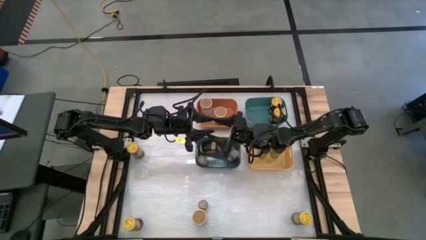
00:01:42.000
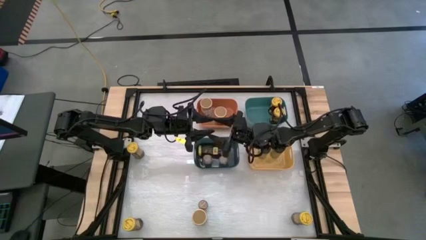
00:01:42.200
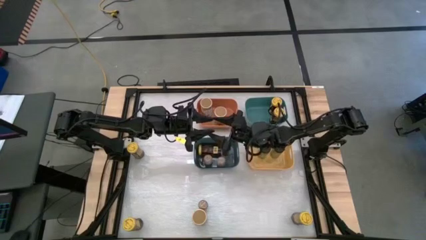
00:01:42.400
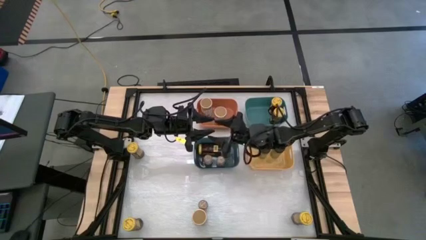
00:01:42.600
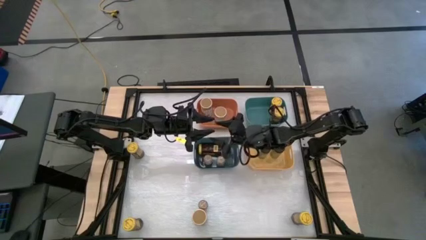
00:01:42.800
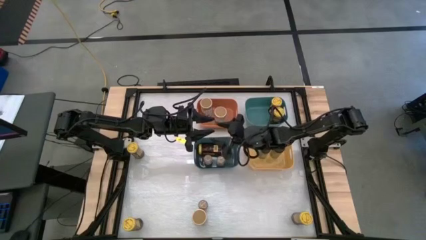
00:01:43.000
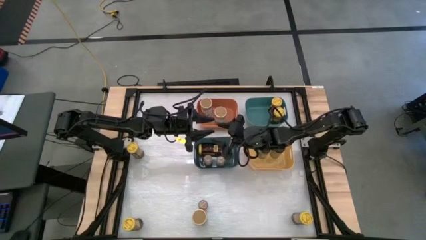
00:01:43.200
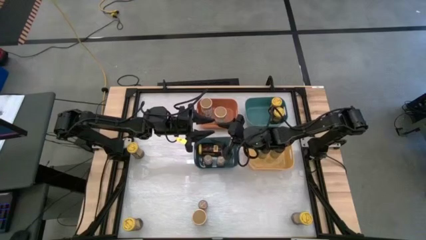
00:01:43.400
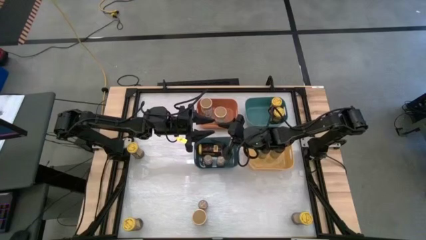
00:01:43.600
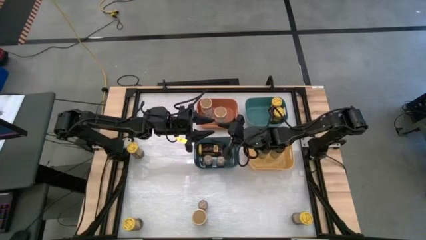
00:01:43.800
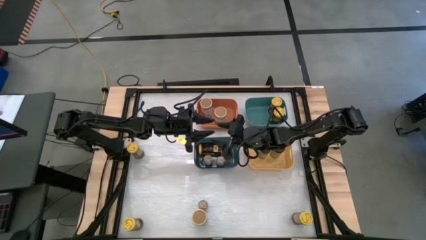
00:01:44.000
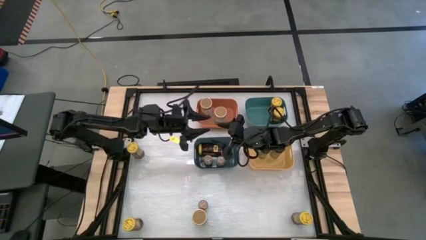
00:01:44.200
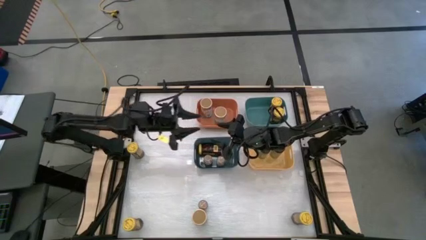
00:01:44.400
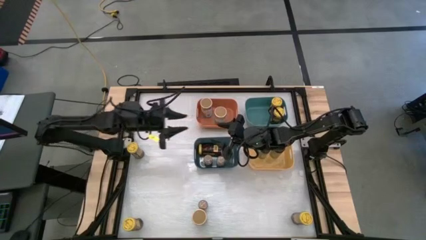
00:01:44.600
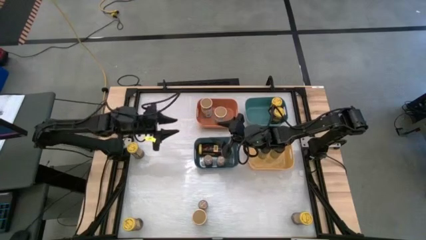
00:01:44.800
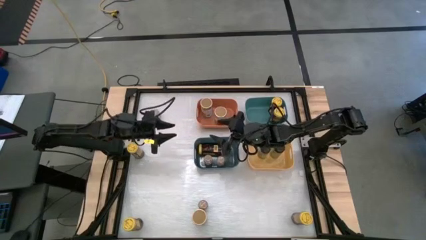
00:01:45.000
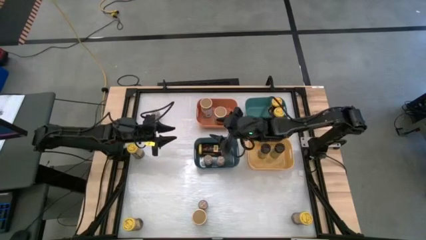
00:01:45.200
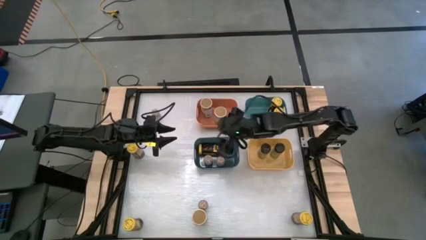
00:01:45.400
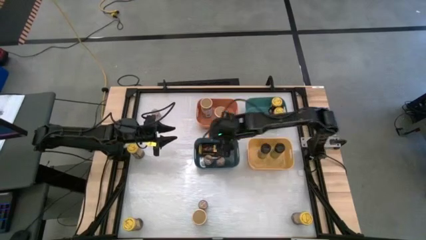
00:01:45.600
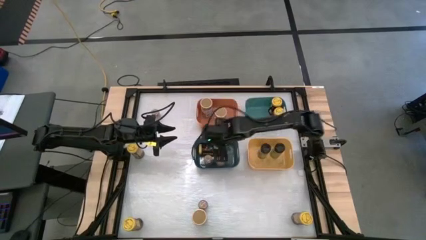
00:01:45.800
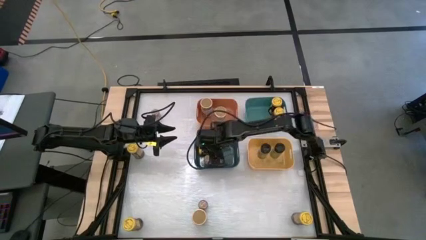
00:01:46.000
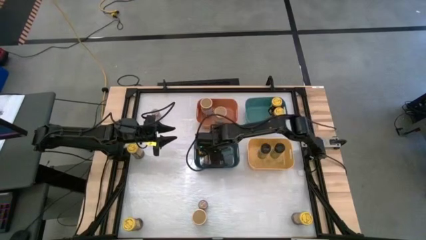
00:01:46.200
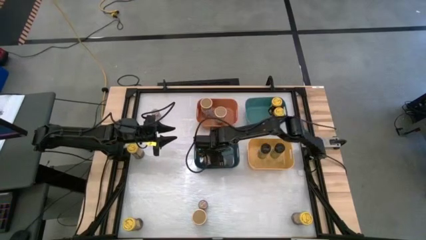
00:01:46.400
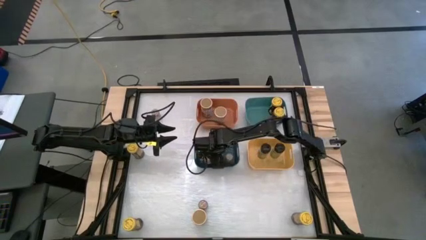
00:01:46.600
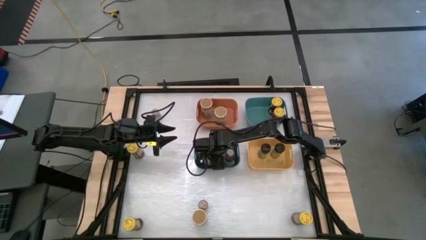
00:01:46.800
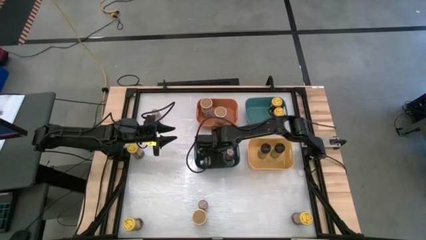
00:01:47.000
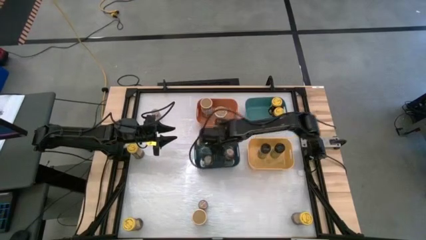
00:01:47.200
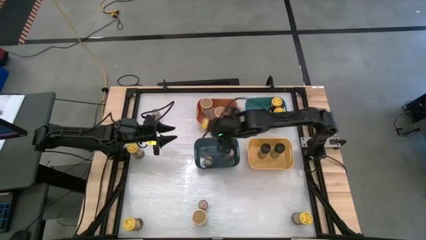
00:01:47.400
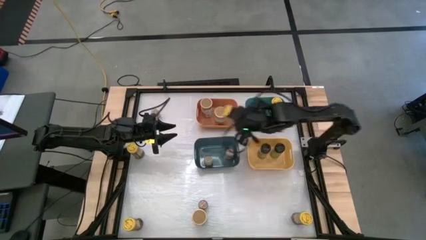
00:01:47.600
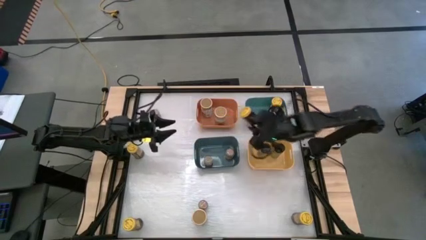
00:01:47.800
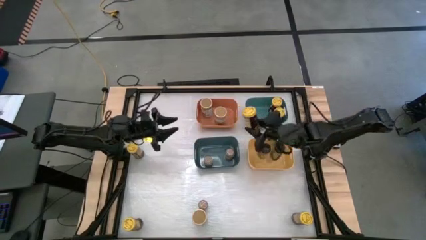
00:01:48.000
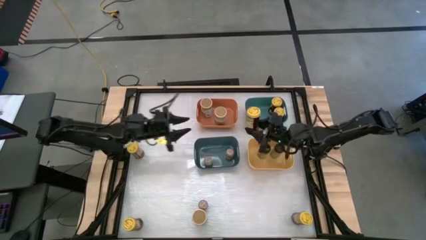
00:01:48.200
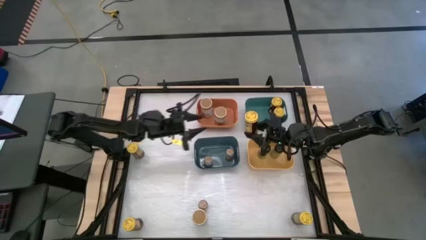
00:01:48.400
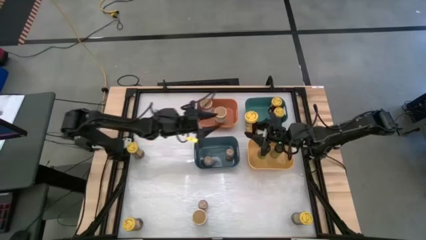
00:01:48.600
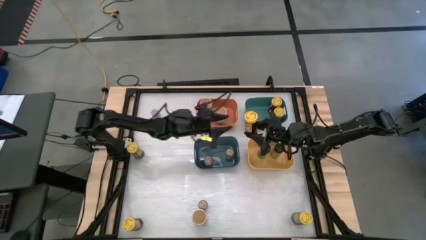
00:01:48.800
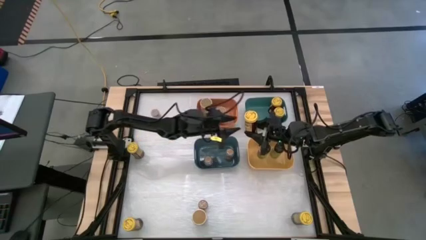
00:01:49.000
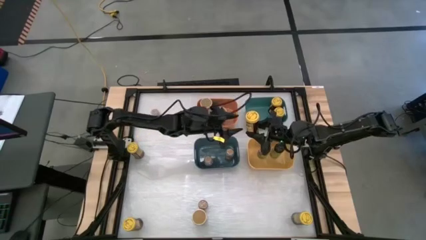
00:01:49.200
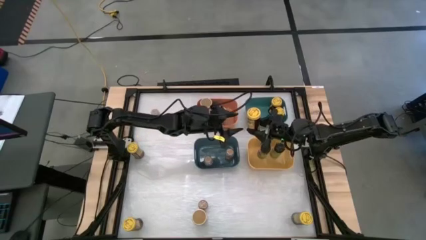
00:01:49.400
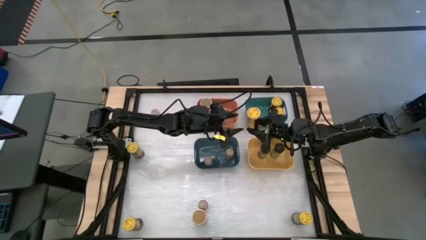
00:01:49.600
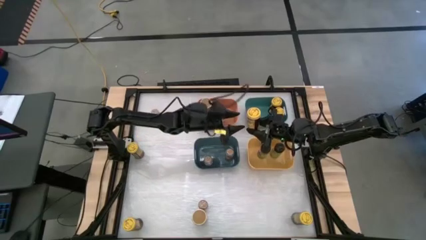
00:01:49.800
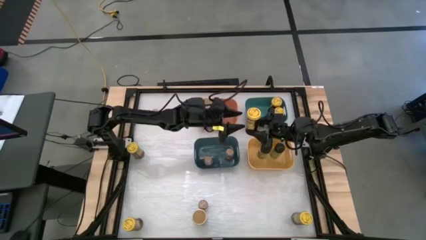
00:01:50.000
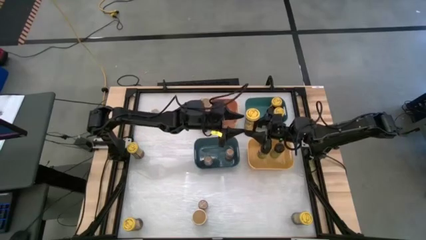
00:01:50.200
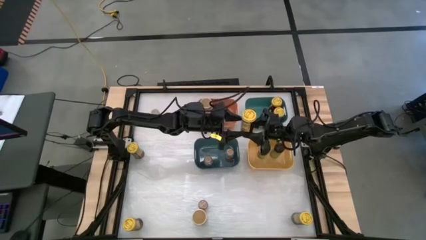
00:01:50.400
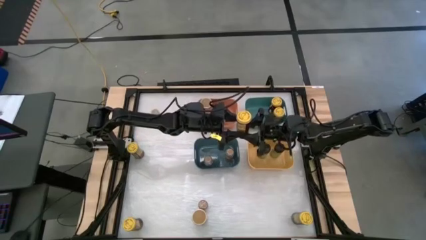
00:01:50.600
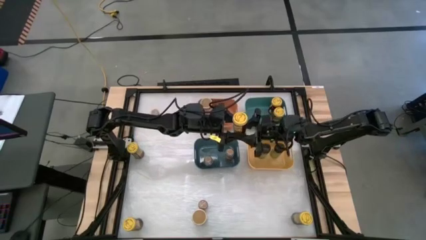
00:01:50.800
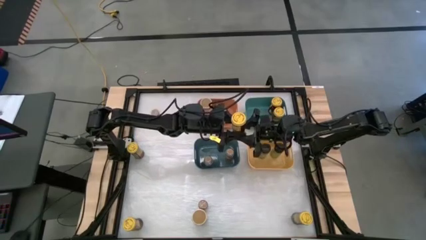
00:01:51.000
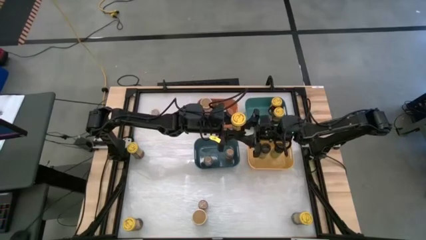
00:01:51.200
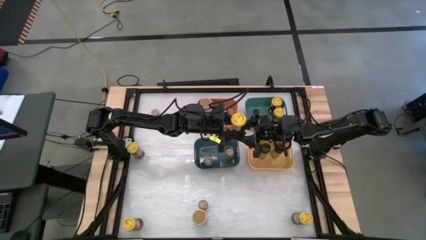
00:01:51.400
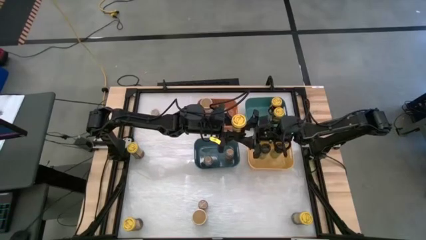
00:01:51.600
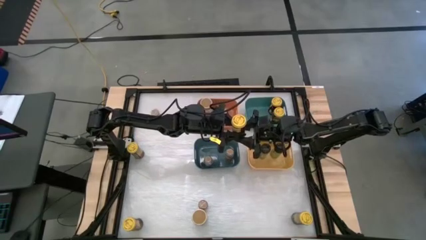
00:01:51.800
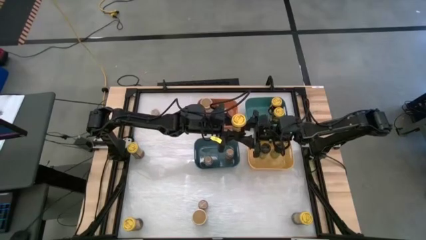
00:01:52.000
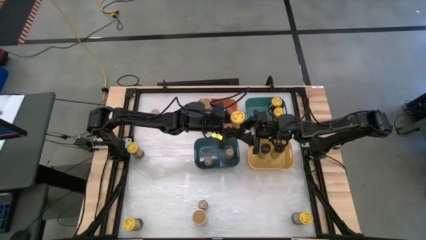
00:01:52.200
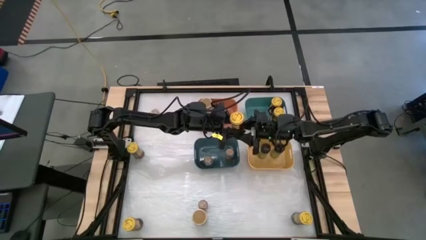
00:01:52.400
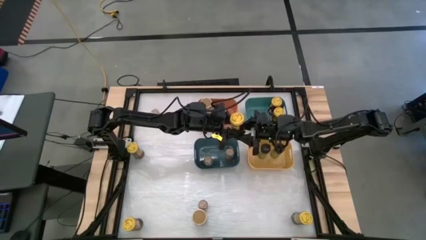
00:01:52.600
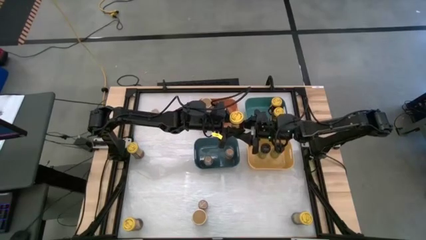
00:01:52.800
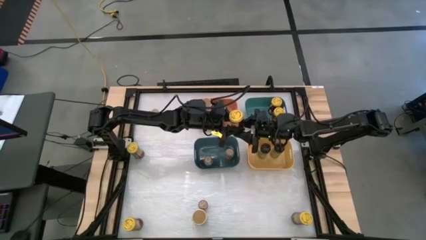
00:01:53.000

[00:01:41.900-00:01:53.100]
Task: Sort spices by type
Put the yellow spice bottle into the green bin

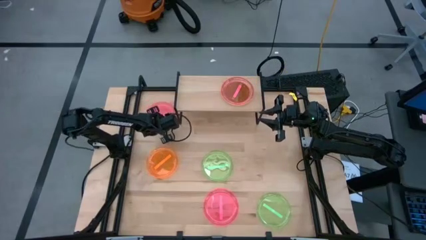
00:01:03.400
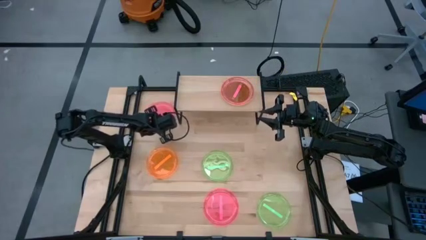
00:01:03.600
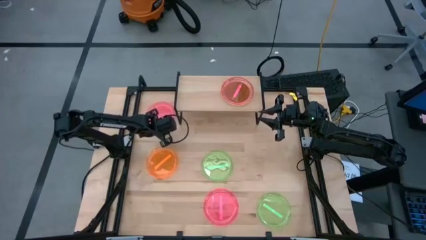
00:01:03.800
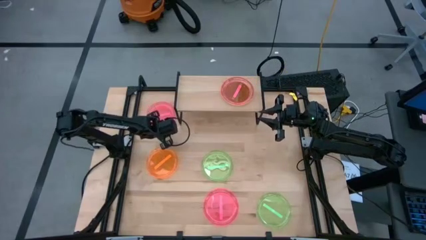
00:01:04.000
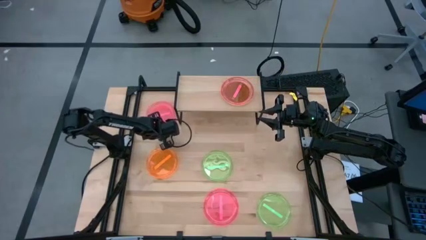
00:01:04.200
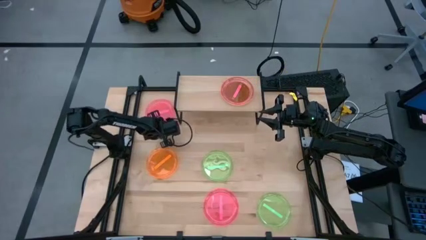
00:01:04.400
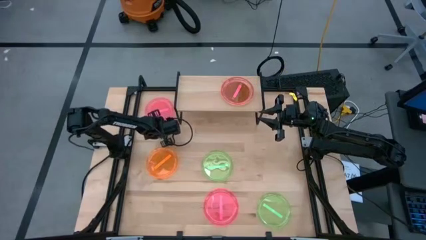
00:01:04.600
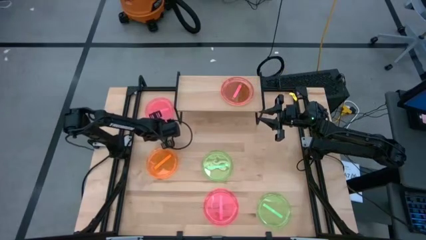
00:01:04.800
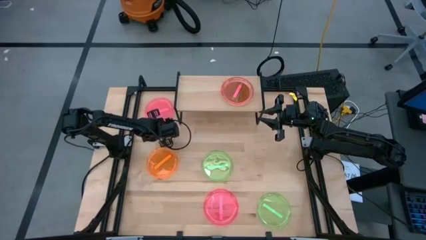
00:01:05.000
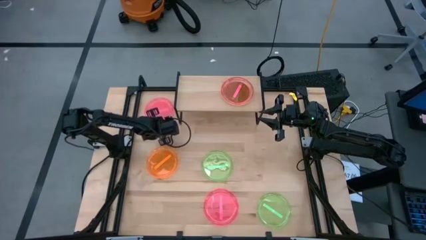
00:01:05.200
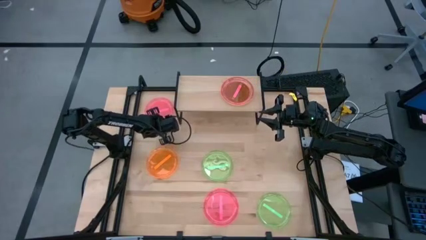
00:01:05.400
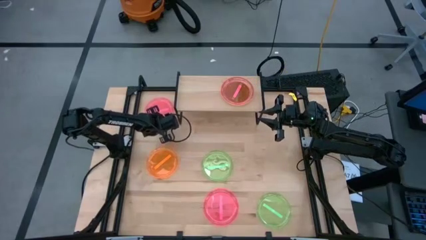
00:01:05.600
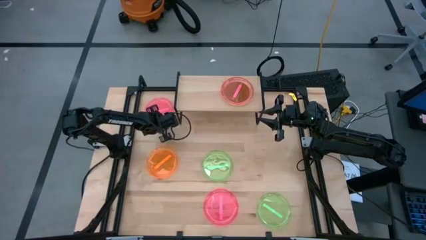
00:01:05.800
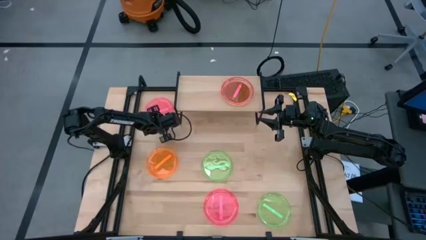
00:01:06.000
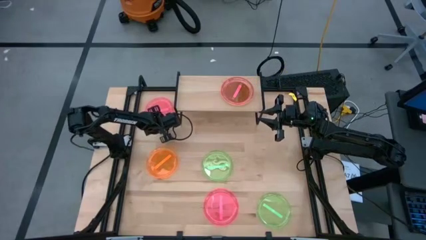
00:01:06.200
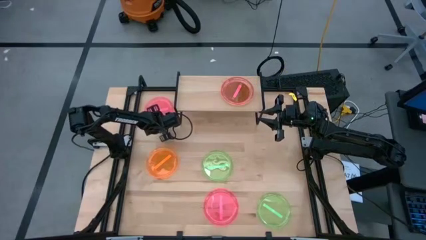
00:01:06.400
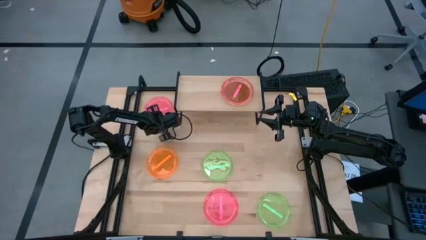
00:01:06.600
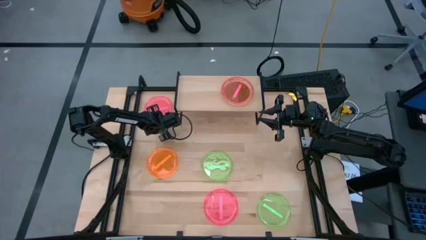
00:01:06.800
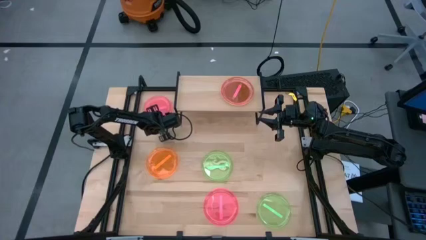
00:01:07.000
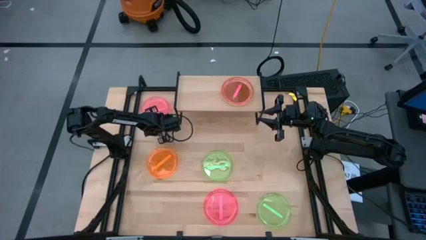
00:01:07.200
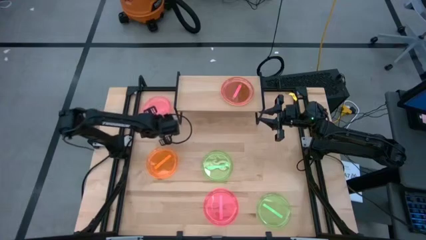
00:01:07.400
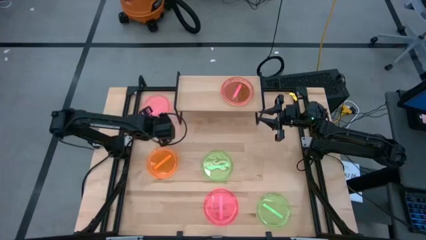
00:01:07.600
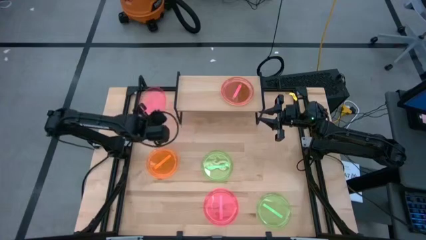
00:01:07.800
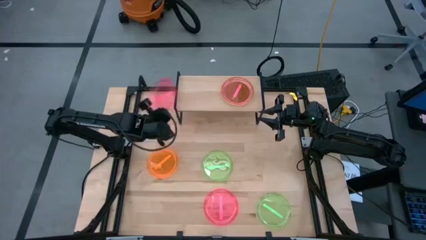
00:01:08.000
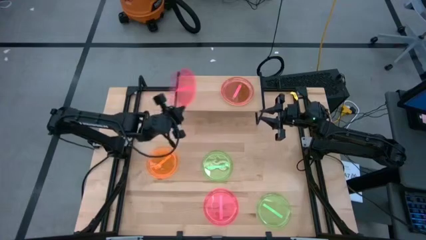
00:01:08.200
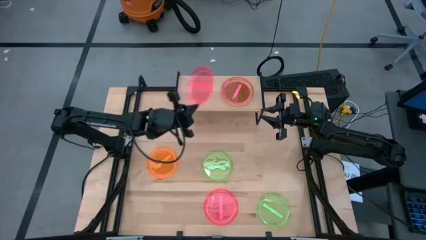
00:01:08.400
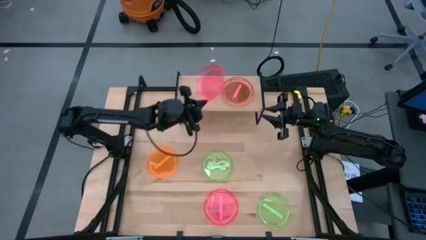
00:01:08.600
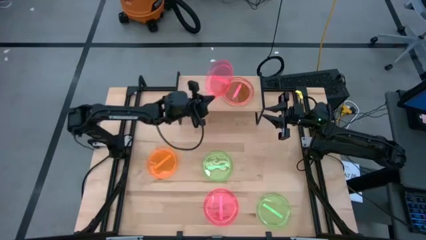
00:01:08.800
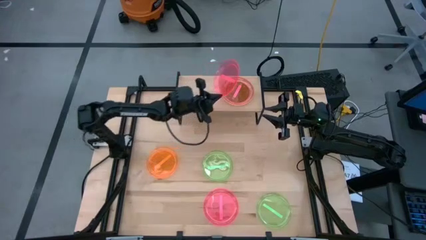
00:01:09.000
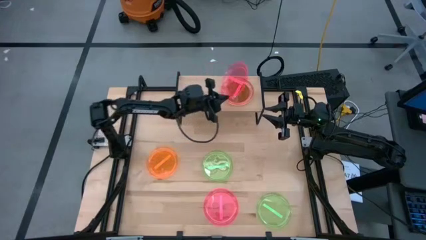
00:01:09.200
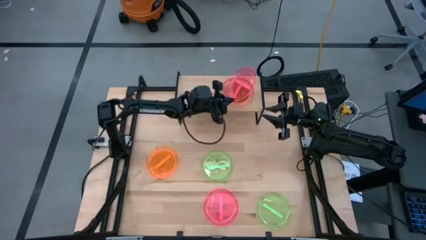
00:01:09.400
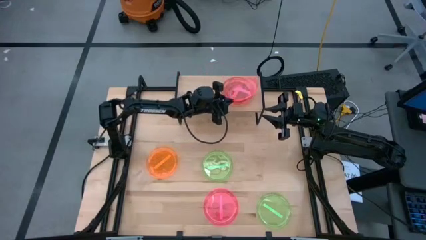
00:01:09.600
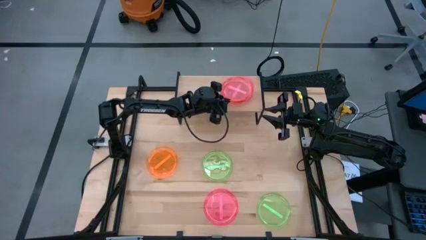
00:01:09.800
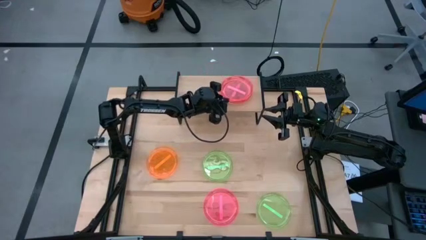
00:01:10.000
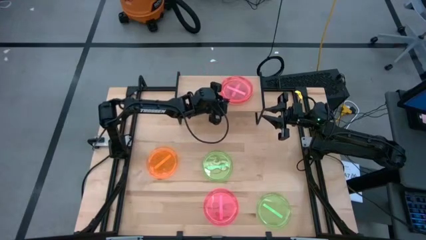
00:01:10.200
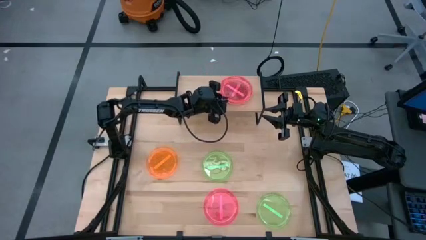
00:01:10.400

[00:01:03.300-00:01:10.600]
Task: Place and stack plates onto a shelf
Stack the pink plate on top of the pink plate on the shelf
